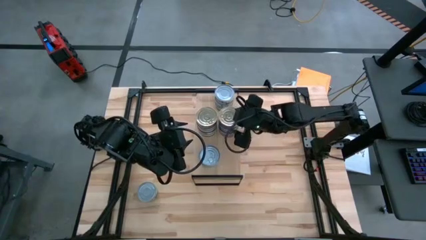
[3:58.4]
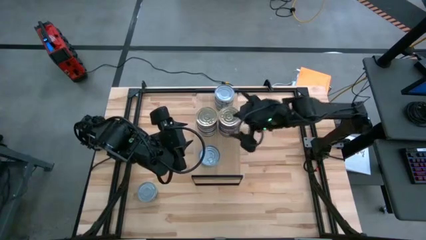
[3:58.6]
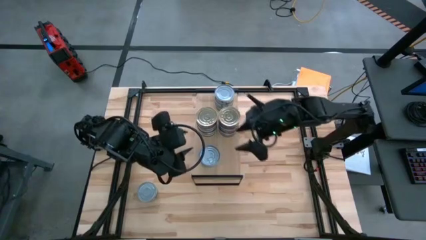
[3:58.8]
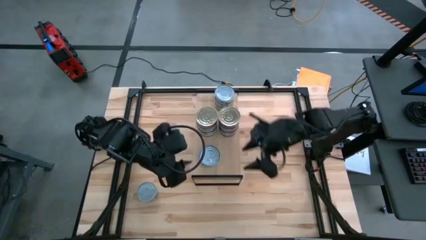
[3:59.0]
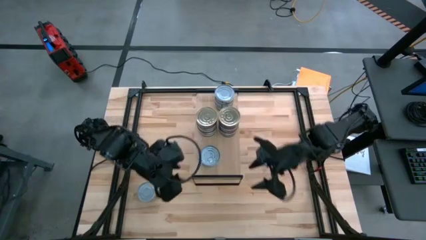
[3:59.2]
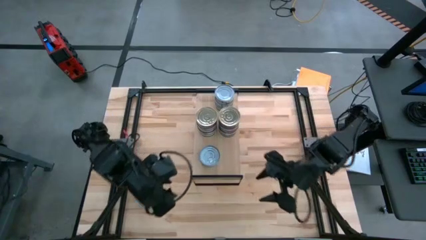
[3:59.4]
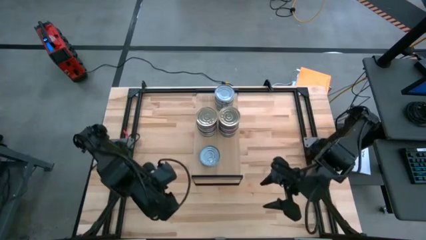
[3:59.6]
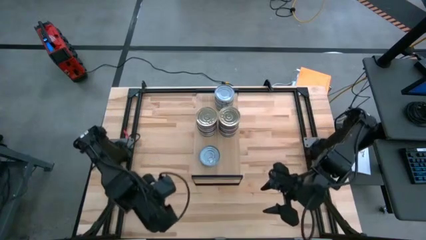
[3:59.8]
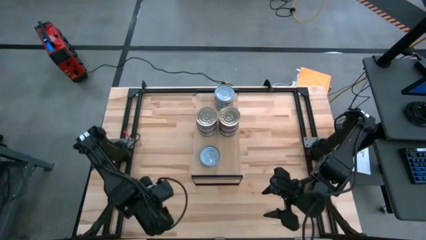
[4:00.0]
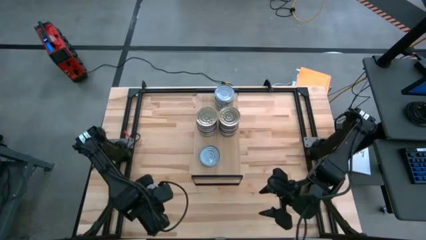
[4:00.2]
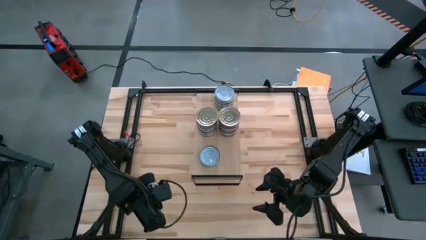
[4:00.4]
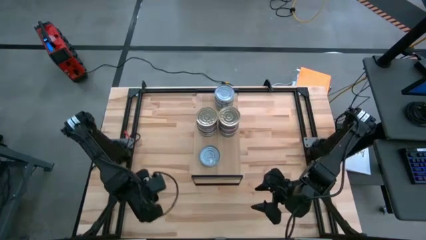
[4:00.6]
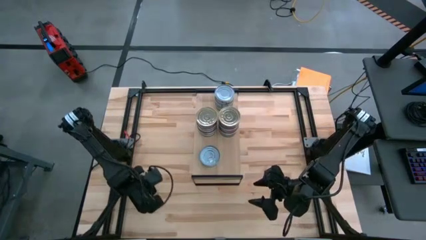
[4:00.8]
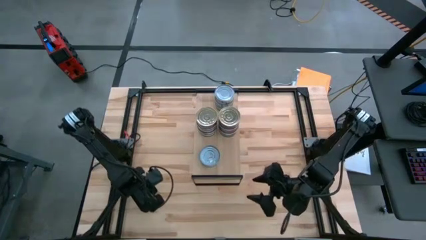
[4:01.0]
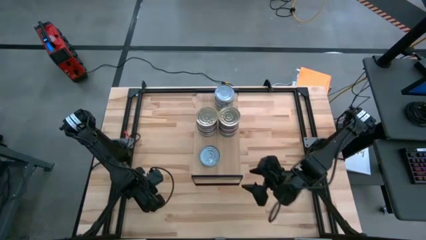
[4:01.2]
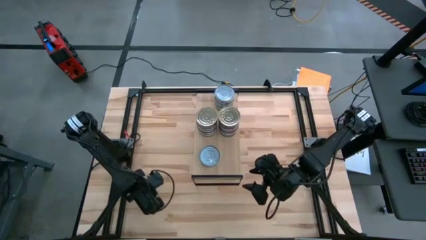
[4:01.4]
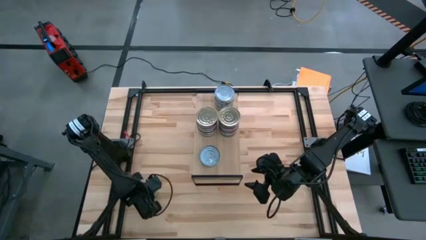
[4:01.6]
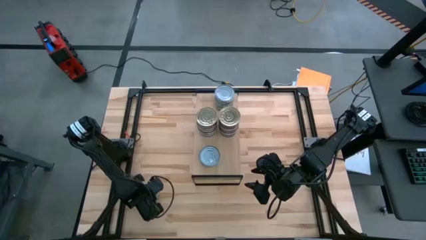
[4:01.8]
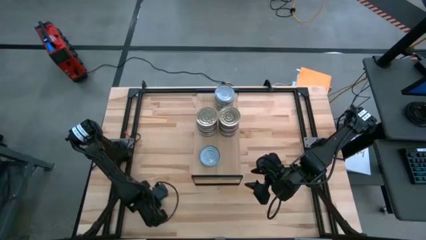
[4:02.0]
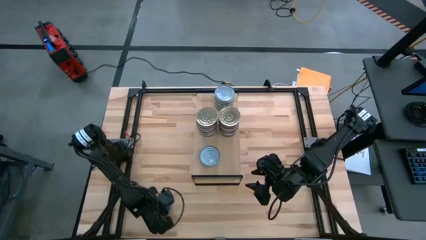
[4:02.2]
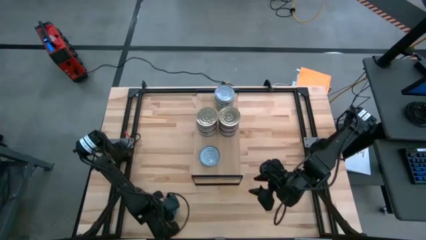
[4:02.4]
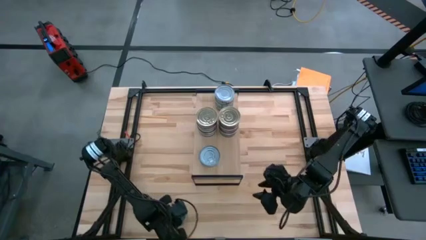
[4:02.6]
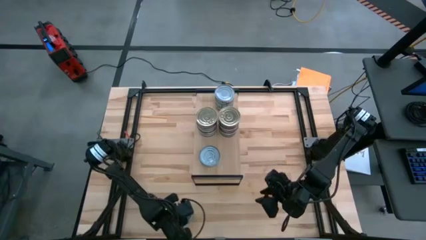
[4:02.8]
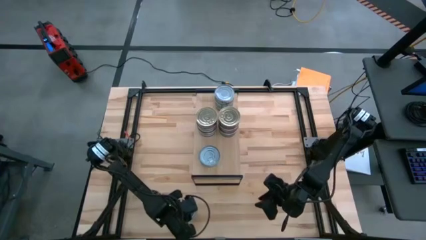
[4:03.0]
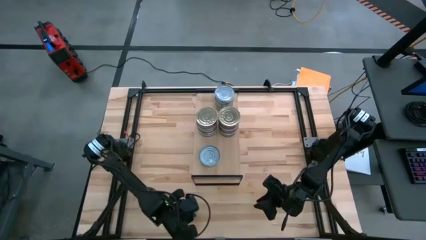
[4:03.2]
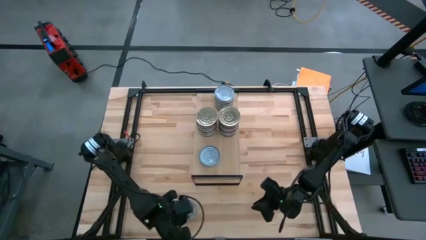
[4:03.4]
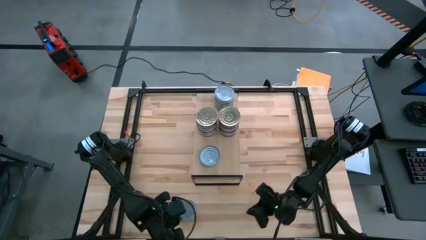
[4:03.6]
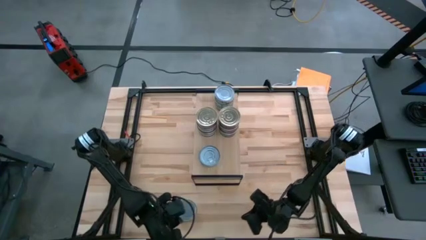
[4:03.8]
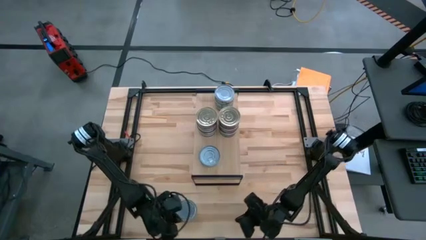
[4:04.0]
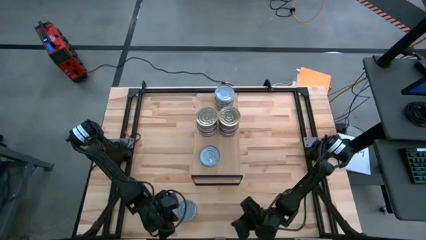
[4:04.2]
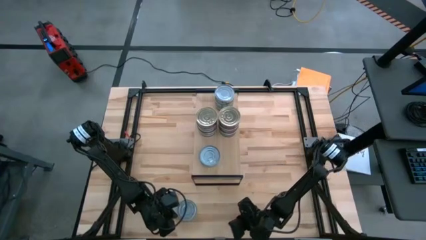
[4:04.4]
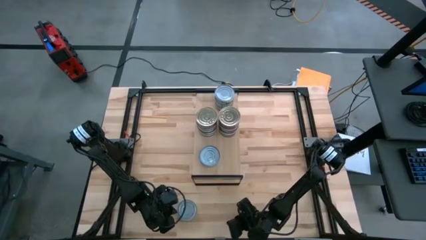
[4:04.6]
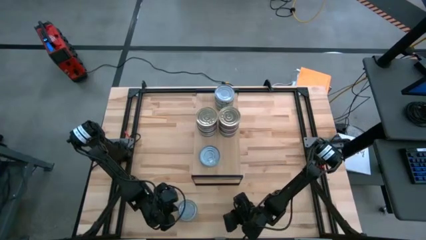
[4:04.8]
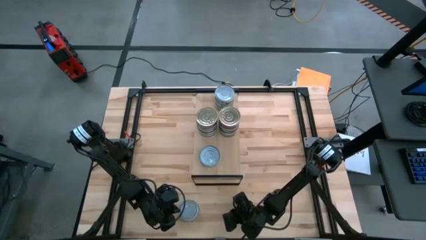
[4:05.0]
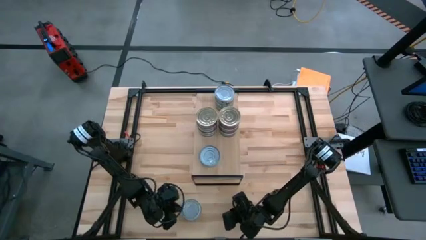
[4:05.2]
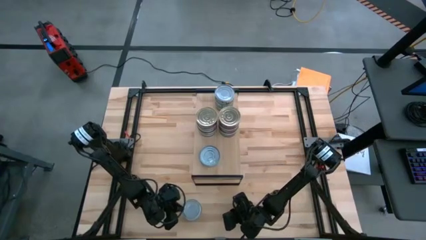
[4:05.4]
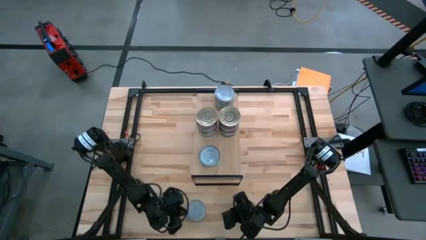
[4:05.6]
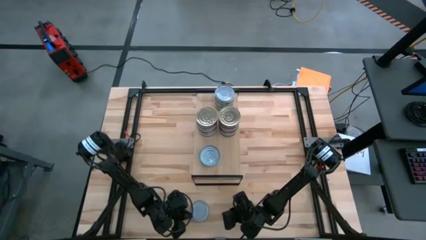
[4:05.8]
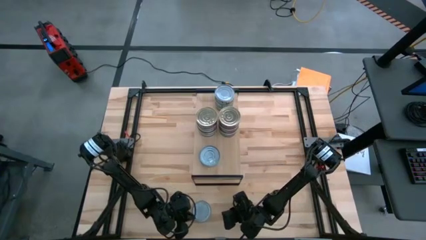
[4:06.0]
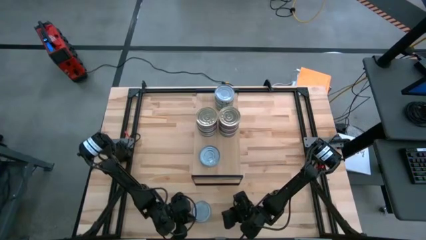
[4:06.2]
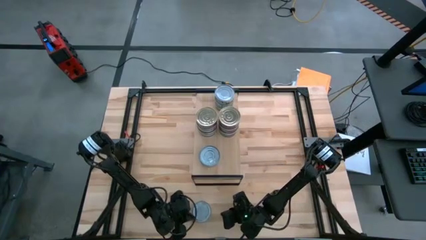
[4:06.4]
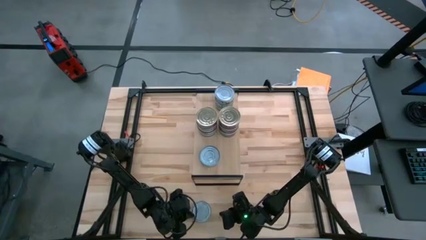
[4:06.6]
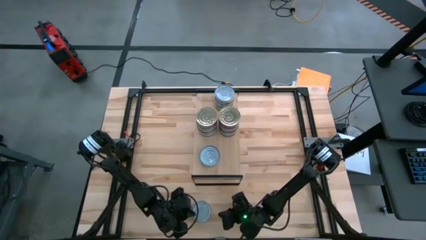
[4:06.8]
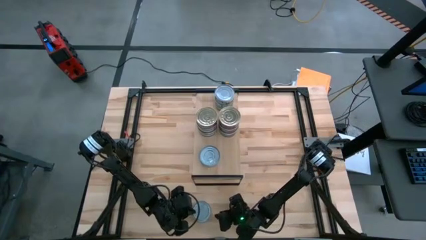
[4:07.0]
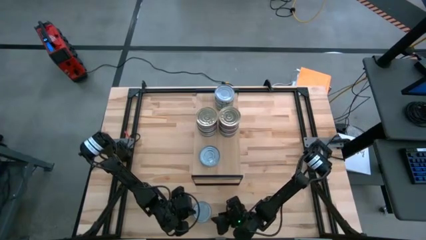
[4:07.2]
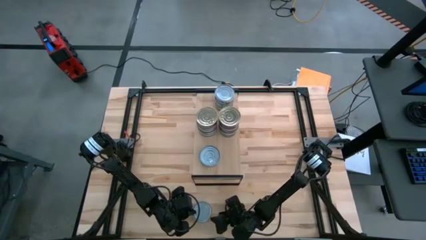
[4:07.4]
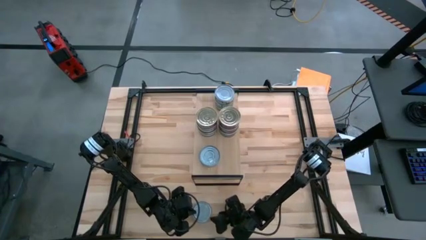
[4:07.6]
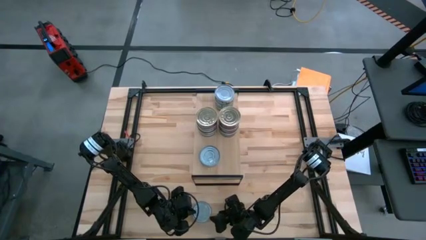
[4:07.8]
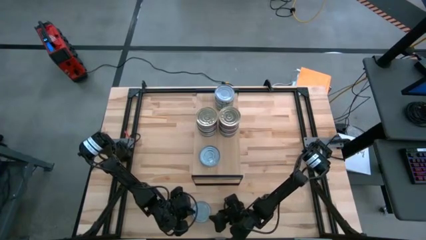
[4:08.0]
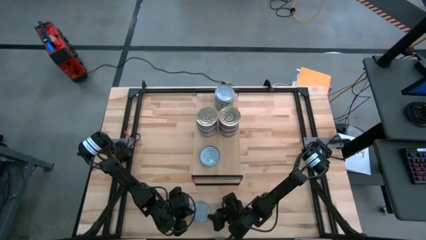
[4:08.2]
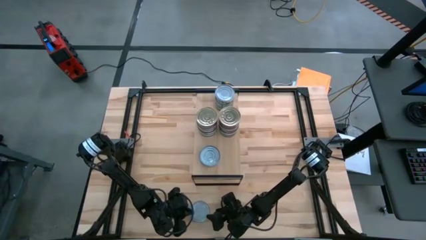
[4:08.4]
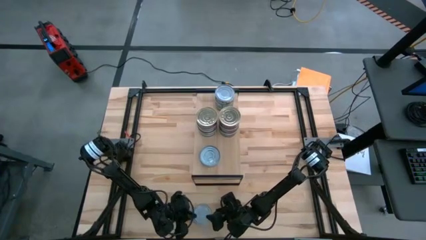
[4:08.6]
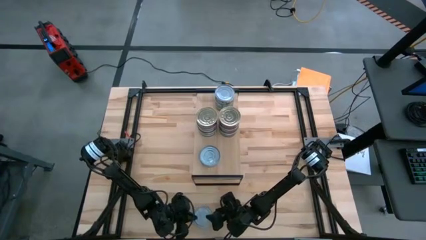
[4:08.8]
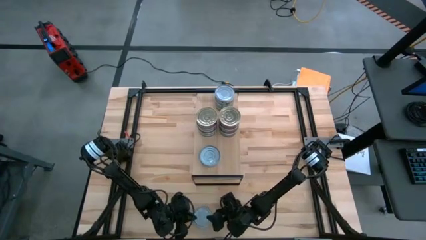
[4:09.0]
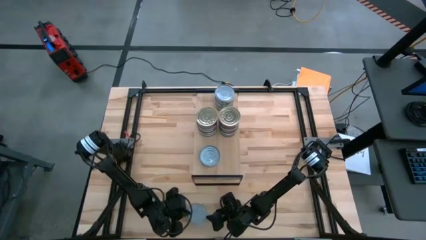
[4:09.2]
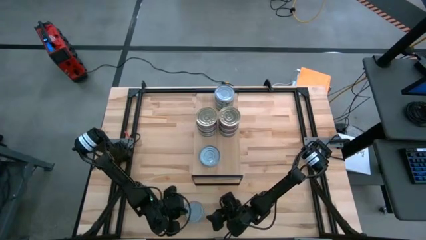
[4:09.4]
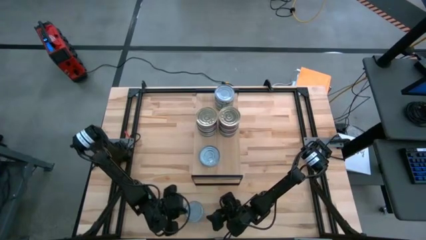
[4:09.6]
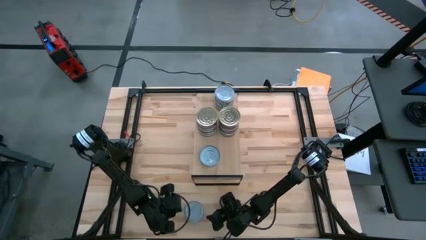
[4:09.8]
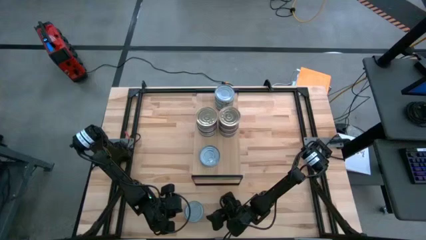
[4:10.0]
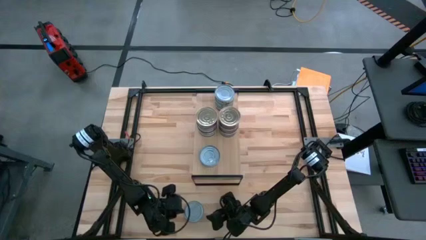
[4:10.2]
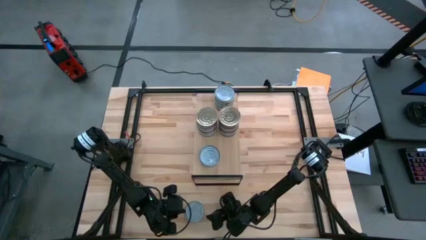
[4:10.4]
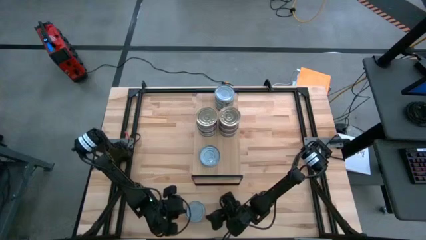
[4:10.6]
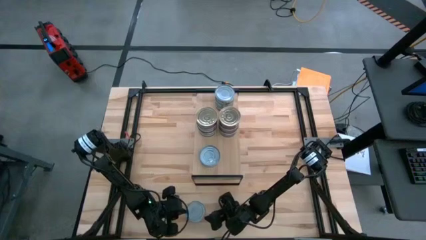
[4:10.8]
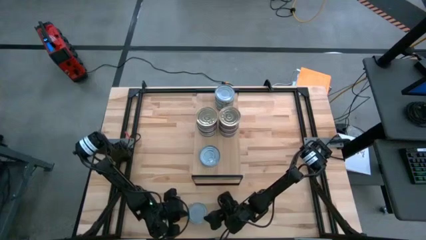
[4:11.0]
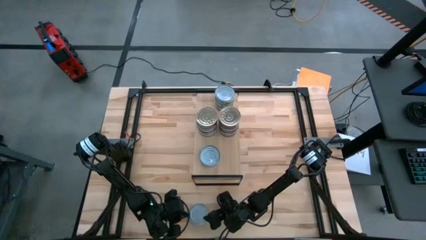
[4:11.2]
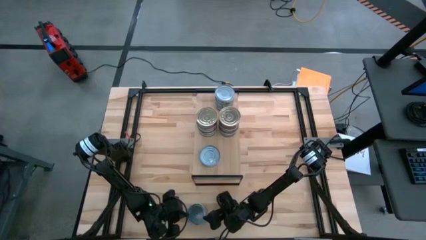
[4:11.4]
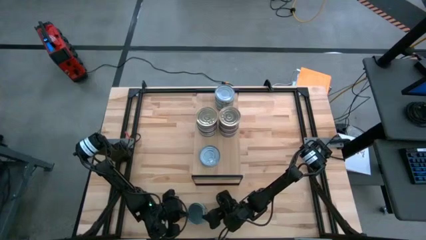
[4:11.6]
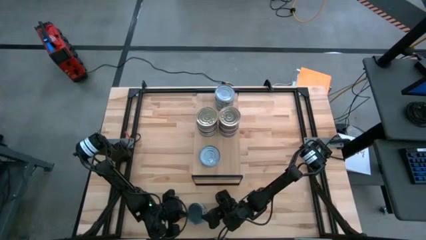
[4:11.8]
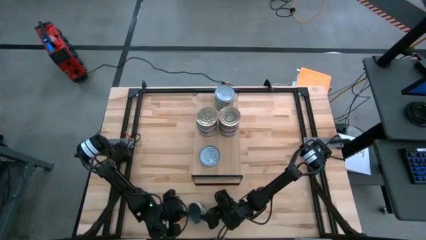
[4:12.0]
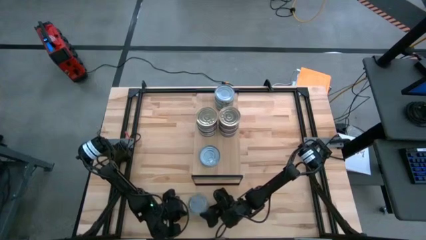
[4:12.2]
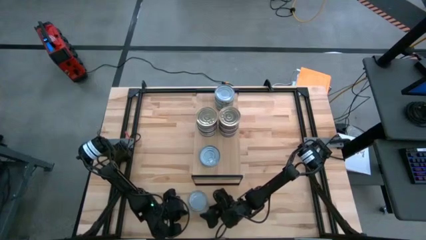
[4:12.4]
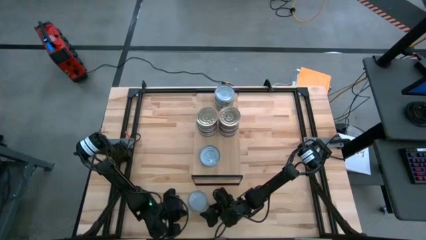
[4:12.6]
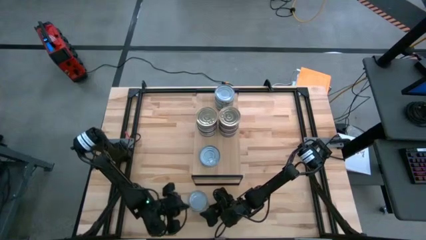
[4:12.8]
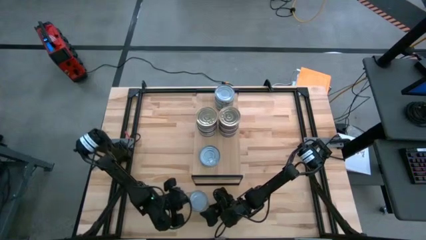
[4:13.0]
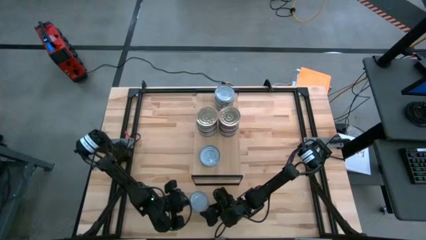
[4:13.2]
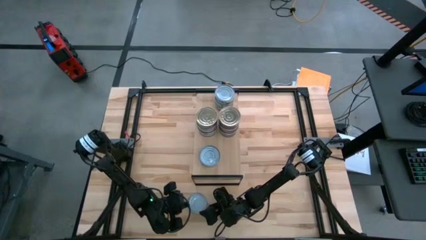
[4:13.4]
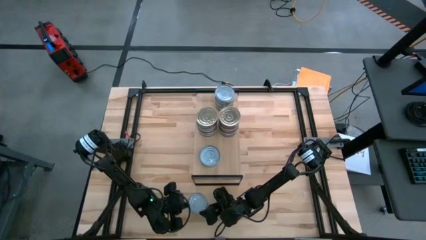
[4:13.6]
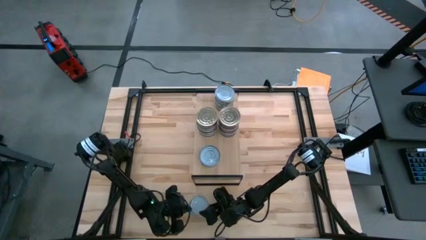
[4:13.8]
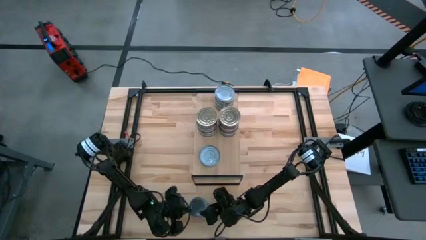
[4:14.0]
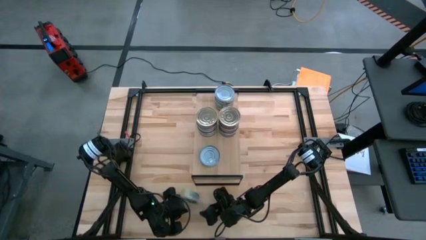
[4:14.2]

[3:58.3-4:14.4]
Task: Stack canned seafood by type on shelf
Stack the green tuna can on top of the green tuna can on the shelf
